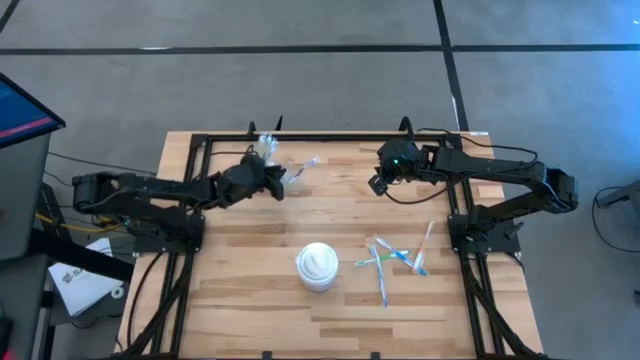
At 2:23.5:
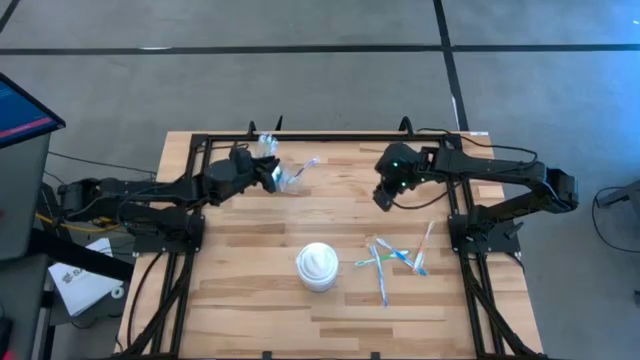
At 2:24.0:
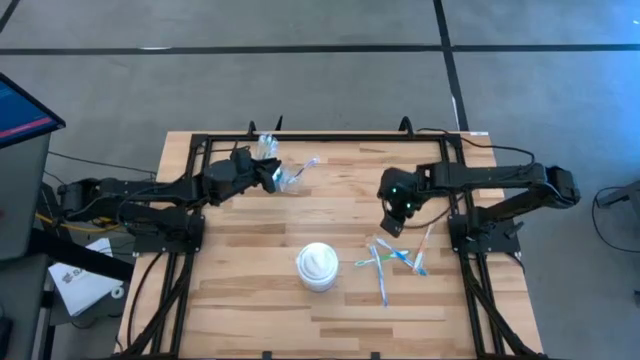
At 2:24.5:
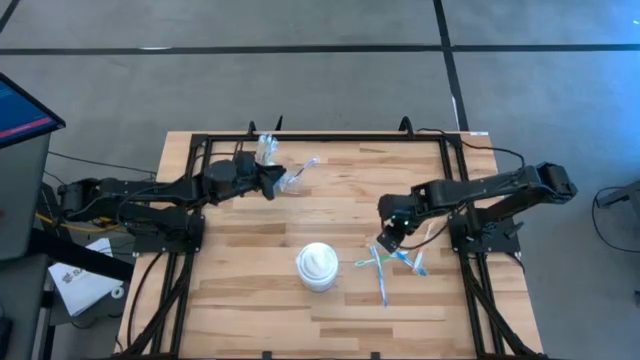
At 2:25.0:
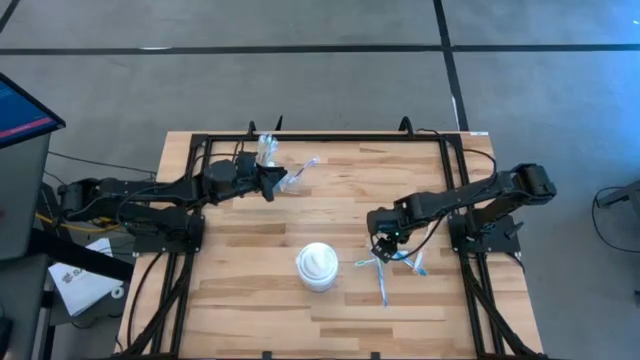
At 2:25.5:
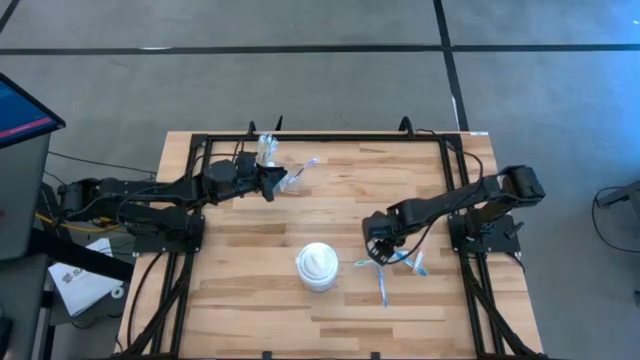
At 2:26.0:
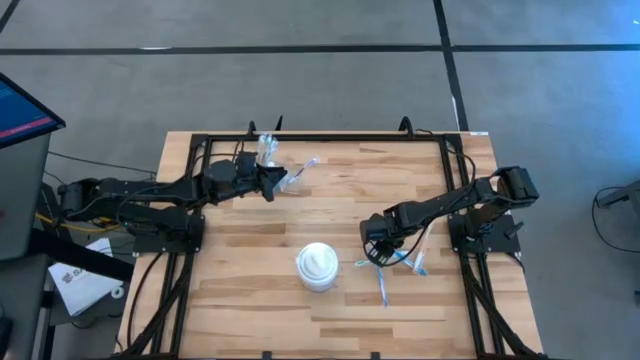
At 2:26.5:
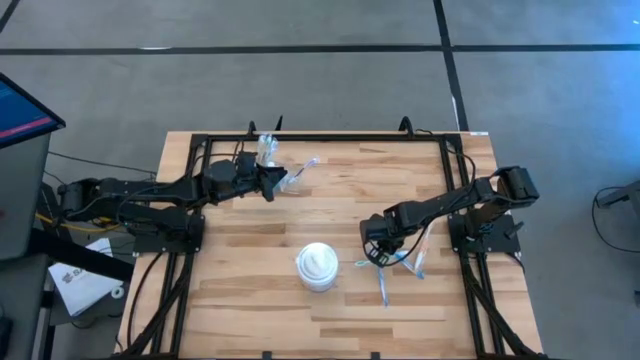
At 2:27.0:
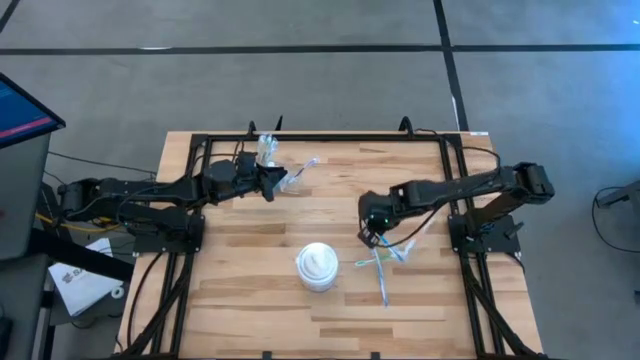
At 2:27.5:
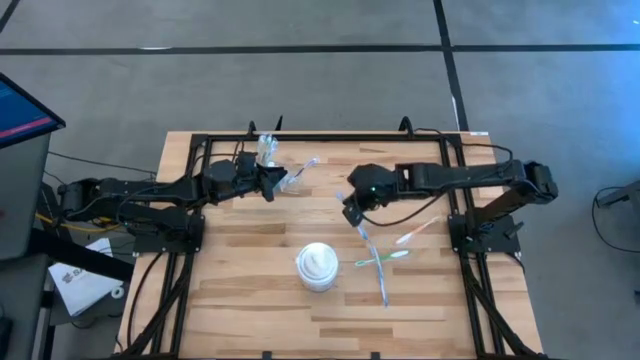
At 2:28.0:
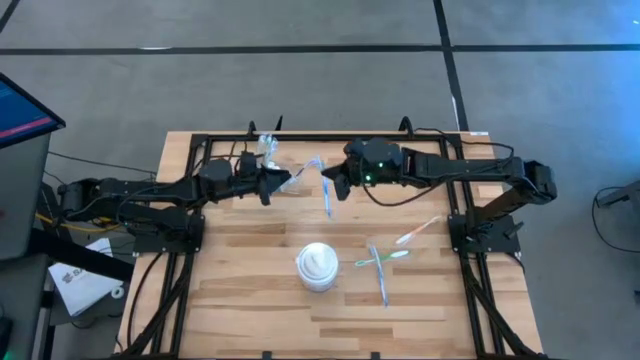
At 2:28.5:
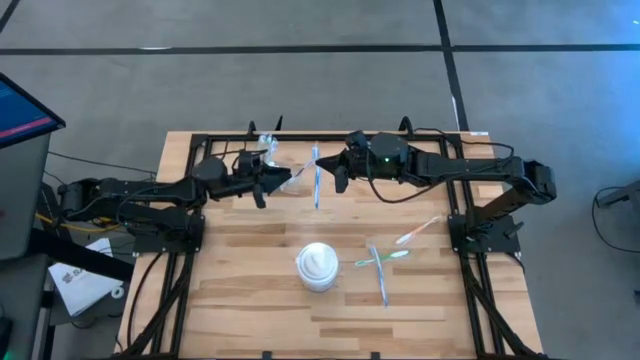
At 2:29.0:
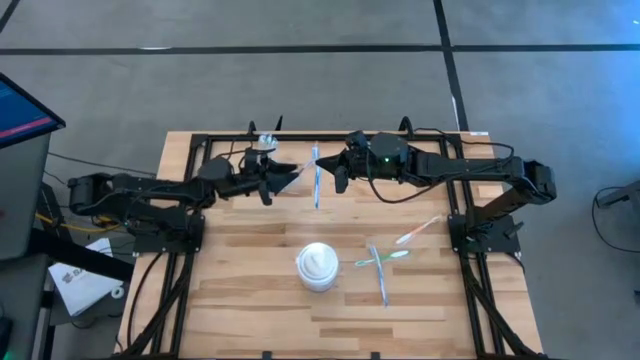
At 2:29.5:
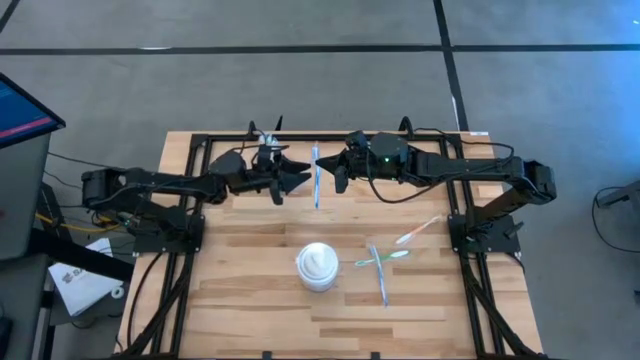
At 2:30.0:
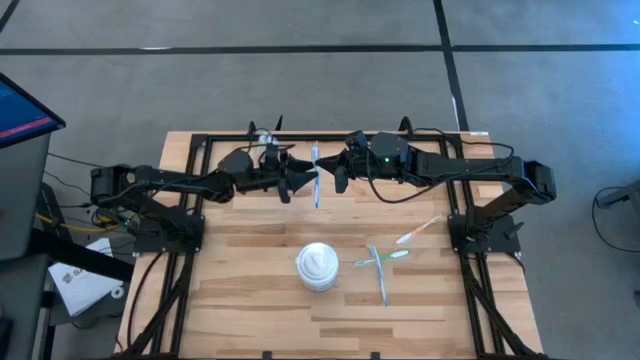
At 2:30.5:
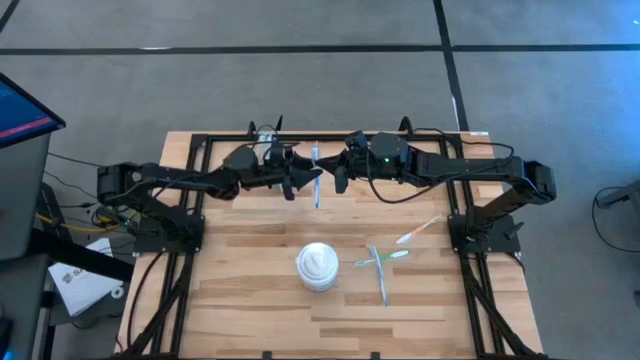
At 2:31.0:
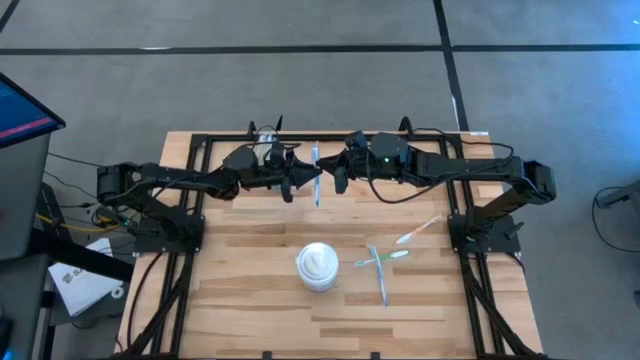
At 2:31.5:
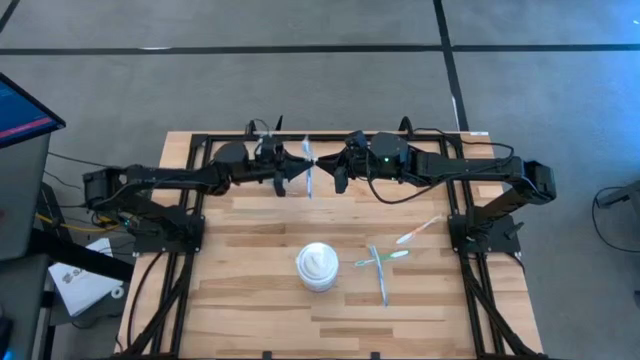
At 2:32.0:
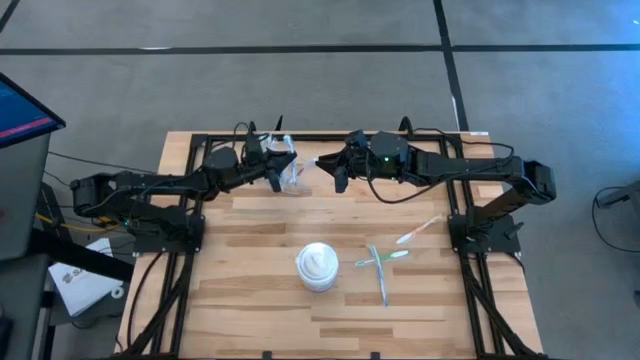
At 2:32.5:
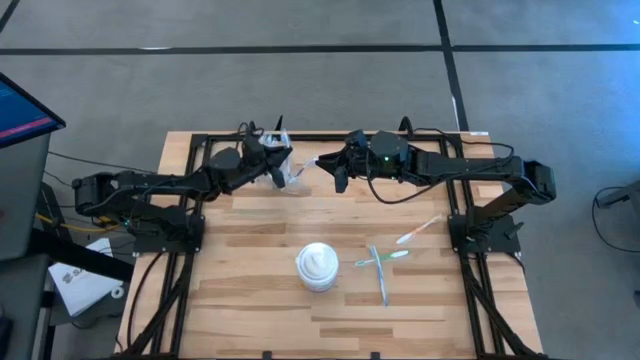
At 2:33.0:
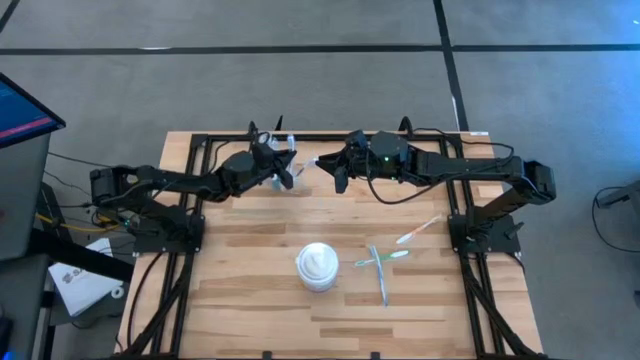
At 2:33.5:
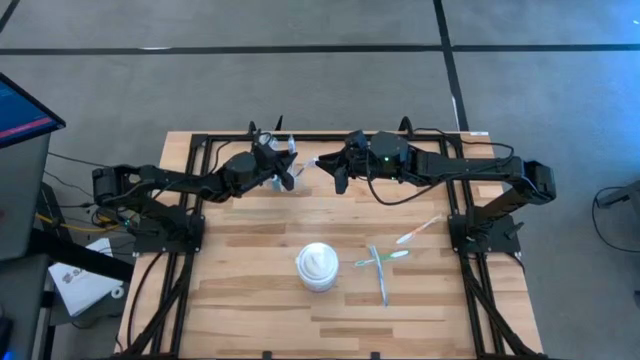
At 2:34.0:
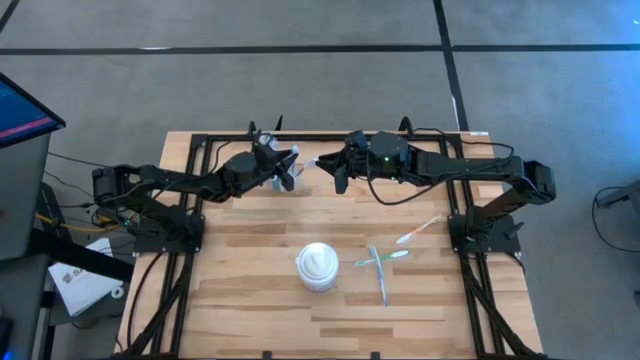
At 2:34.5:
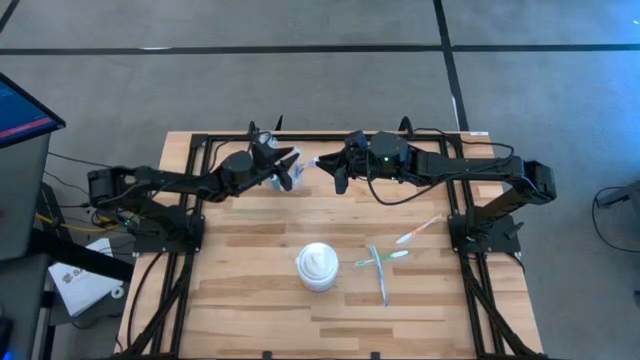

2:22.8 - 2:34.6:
Task: Pick & Place toothbrushing station
Put the right blue toothbrush into the transparent organizer

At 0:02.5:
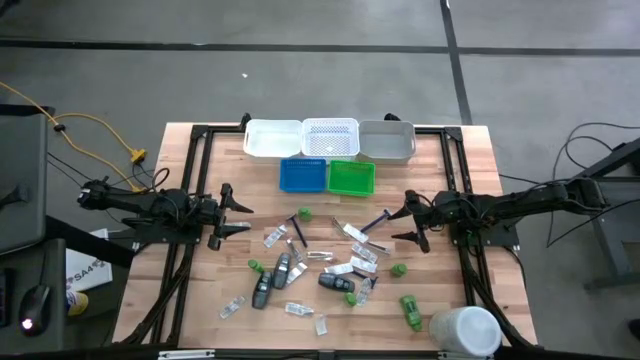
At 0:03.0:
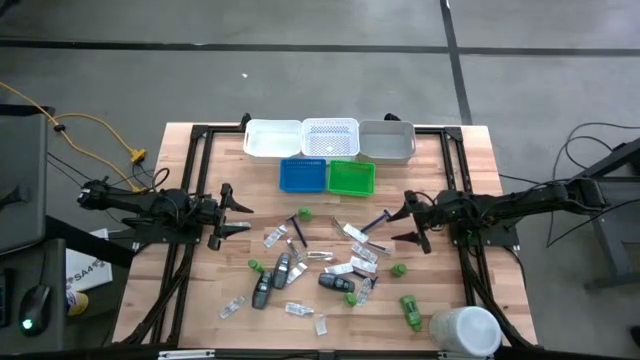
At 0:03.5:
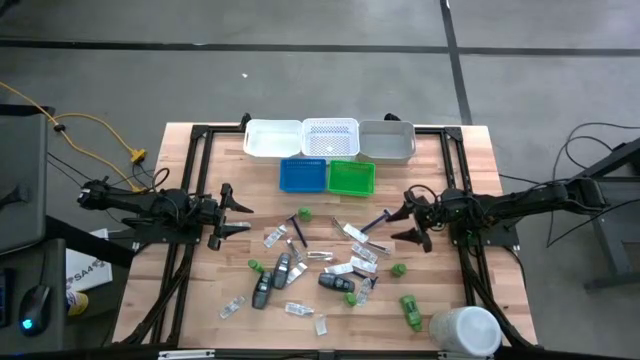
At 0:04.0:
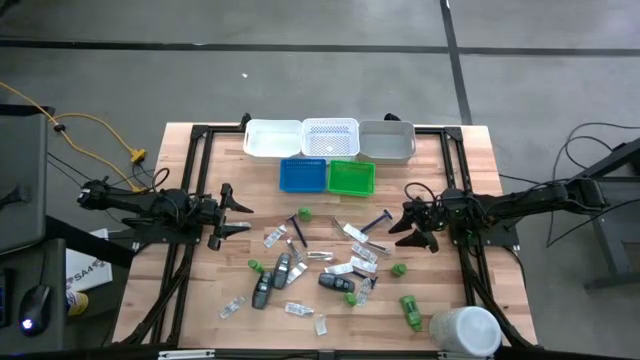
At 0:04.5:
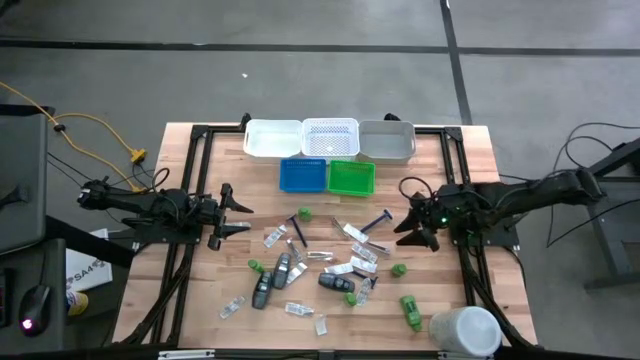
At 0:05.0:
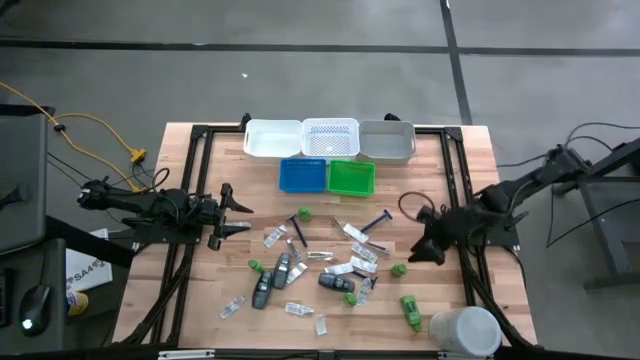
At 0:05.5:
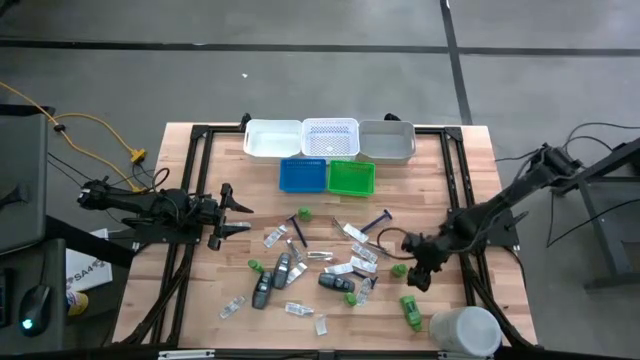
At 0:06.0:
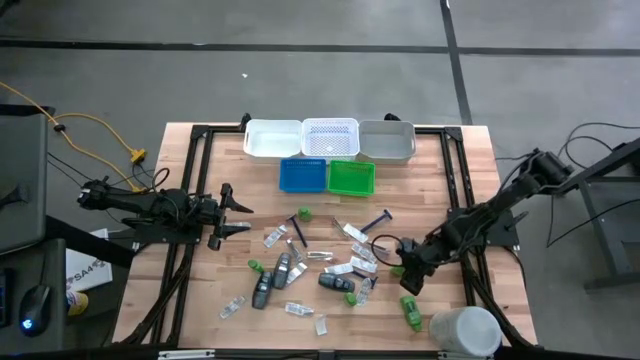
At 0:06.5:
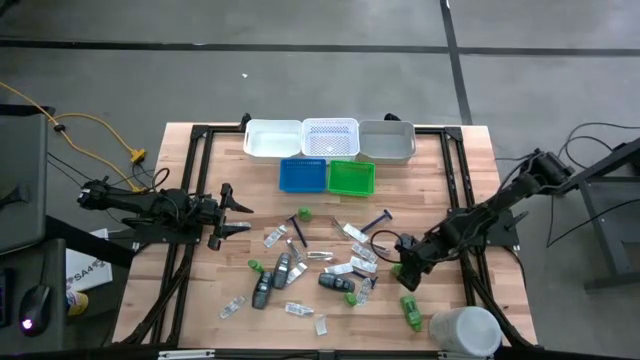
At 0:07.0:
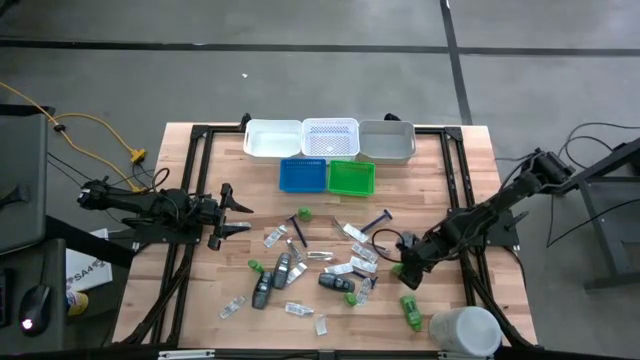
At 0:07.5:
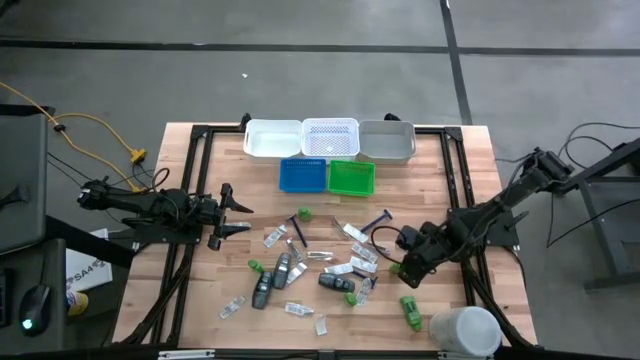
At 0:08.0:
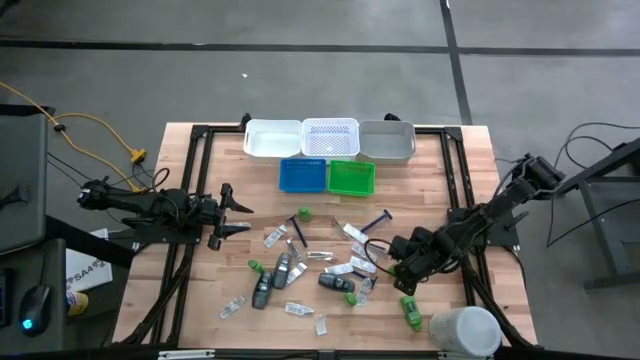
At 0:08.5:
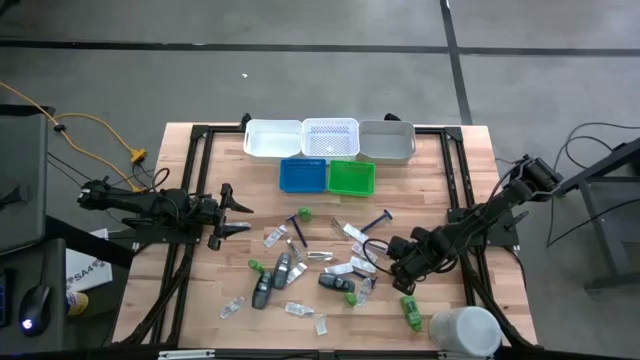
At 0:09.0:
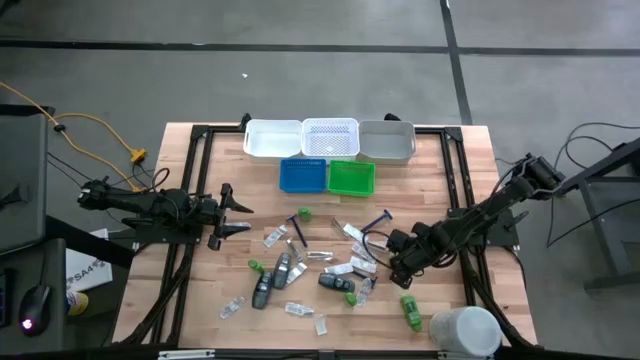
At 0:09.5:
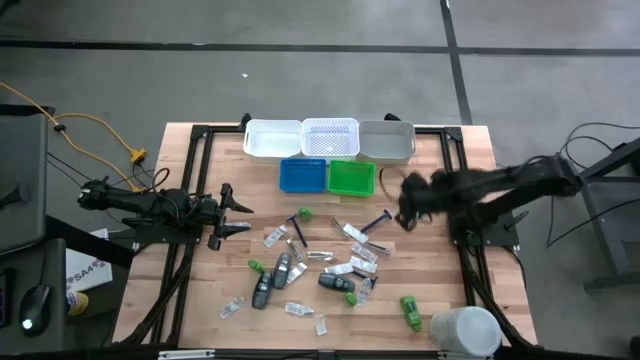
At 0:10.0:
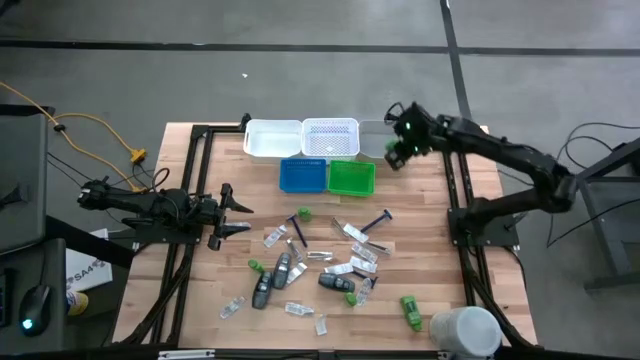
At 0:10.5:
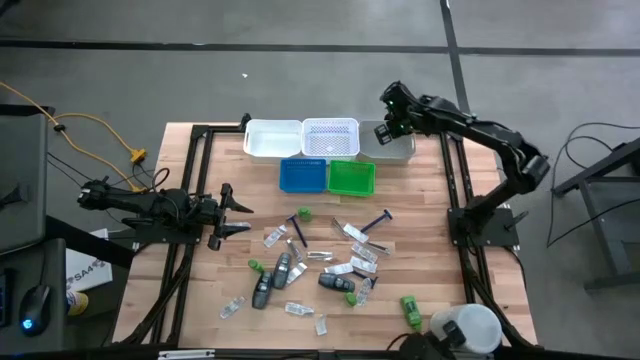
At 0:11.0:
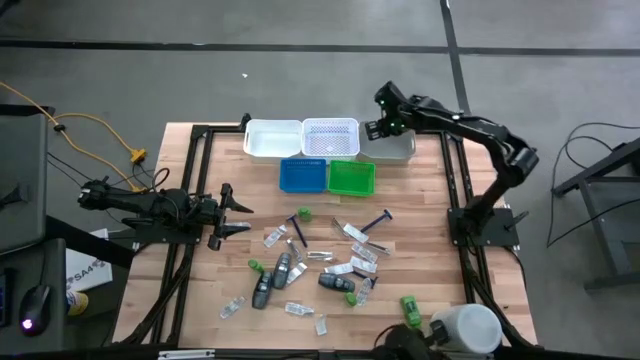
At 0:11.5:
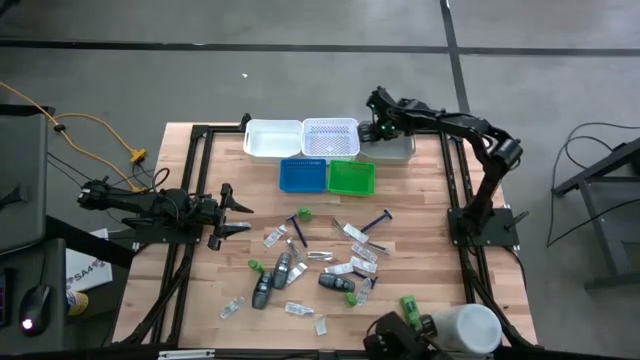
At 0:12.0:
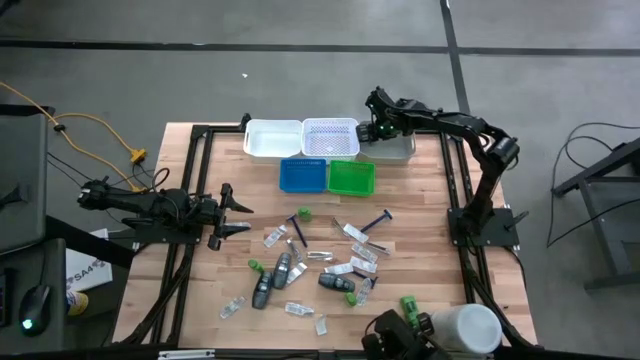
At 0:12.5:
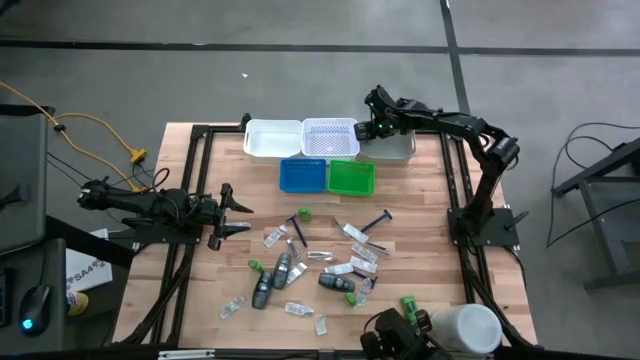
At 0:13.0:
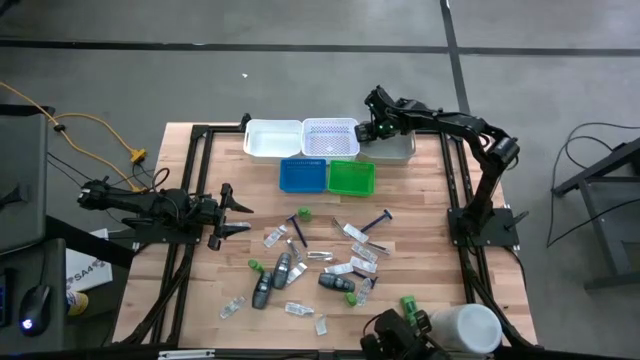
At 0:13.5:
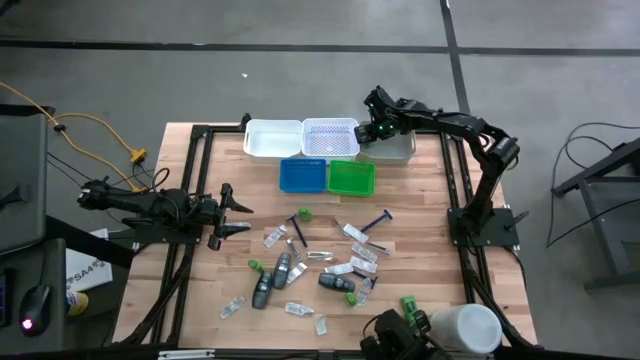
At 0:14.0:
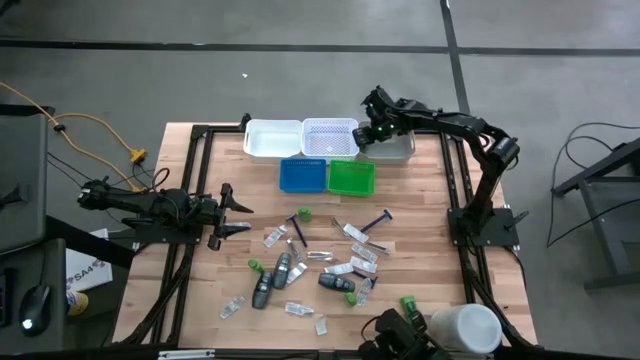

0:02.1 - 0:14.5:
Task: Pick & Place Travel size toiletries
Put the green shampoo bottle into the gray bin
